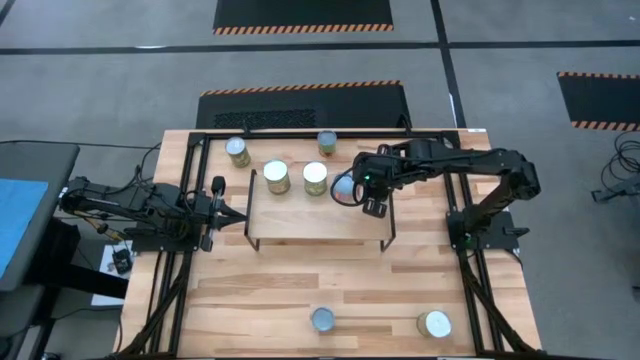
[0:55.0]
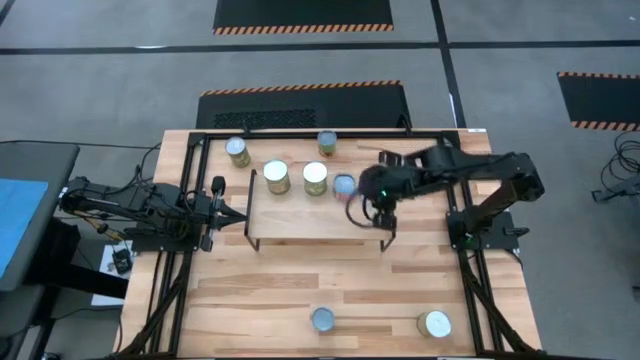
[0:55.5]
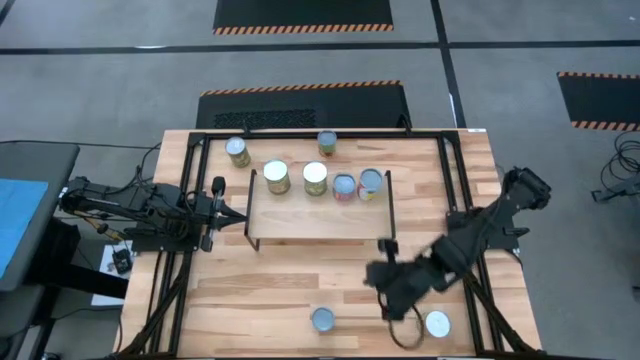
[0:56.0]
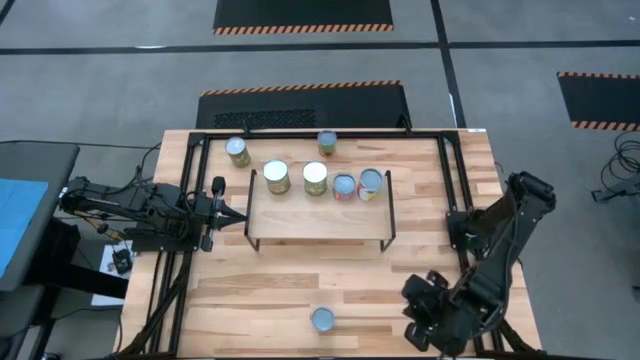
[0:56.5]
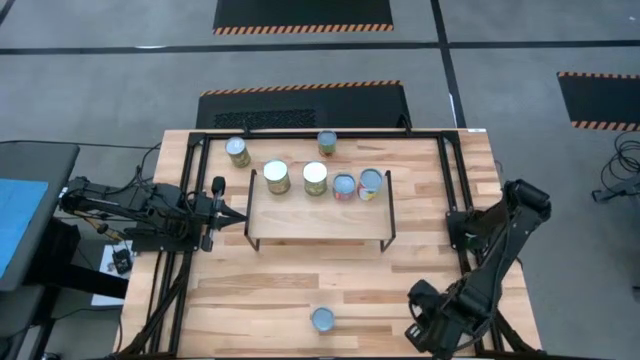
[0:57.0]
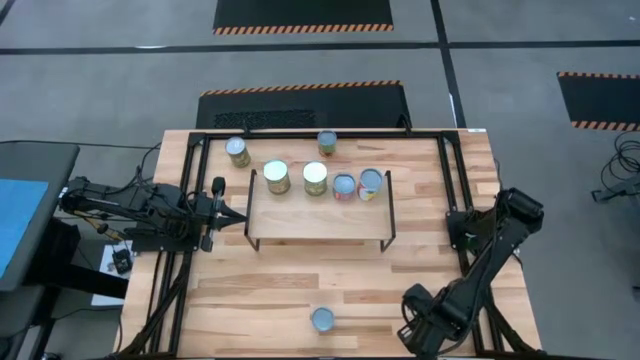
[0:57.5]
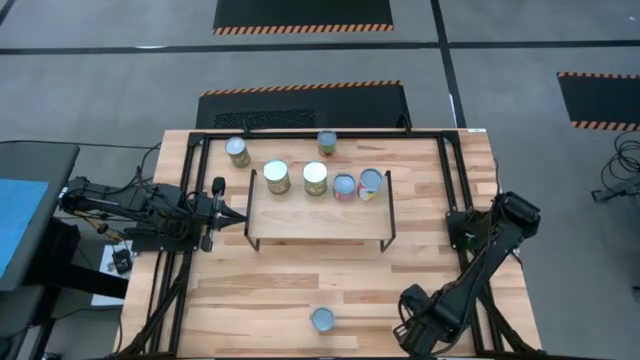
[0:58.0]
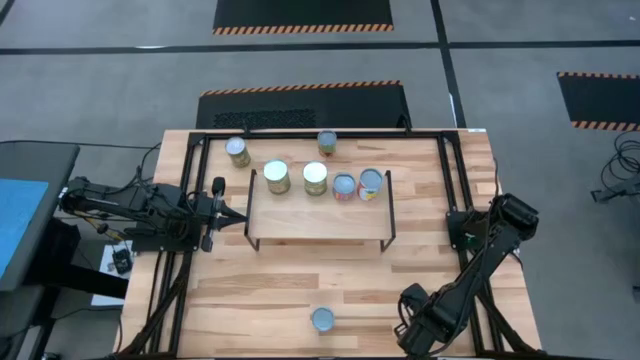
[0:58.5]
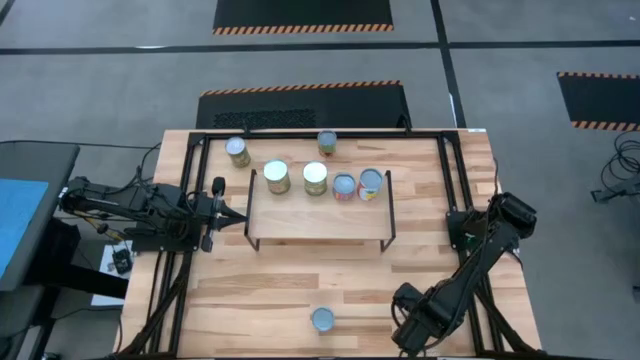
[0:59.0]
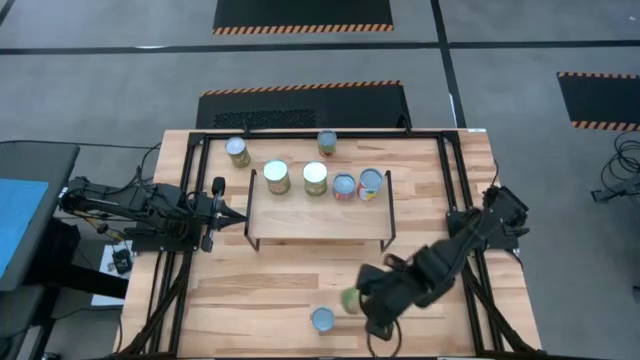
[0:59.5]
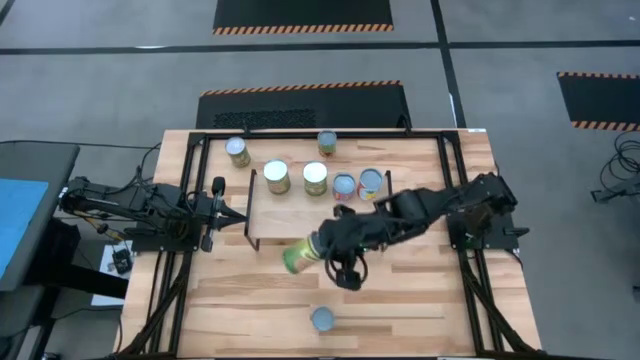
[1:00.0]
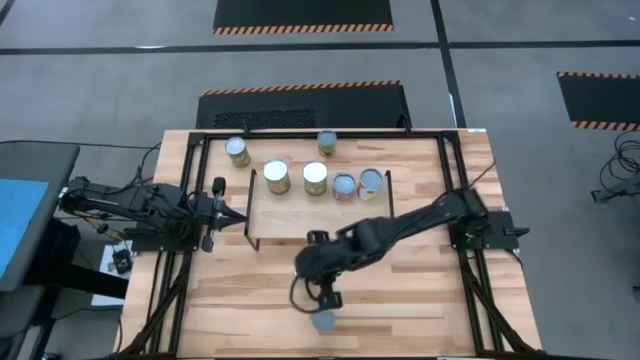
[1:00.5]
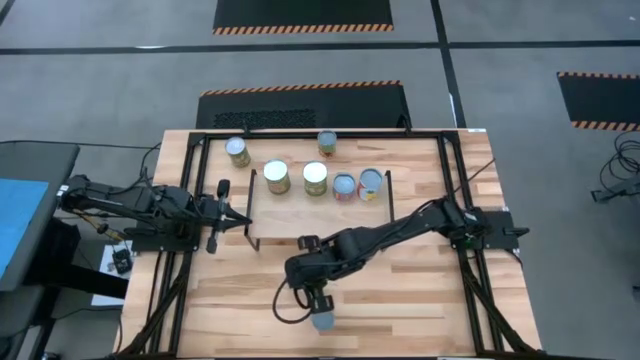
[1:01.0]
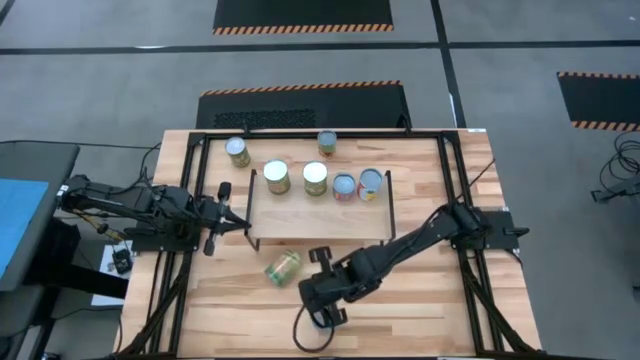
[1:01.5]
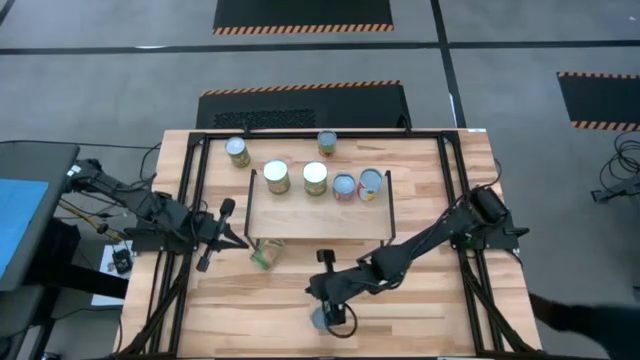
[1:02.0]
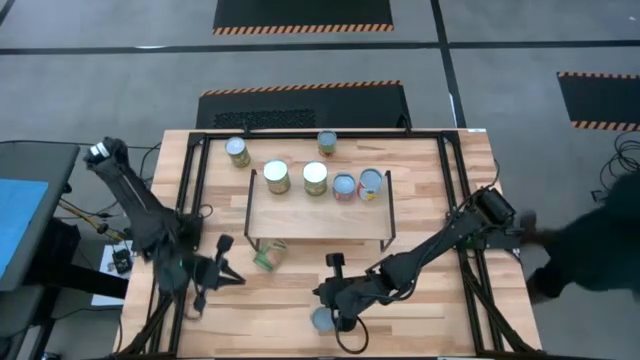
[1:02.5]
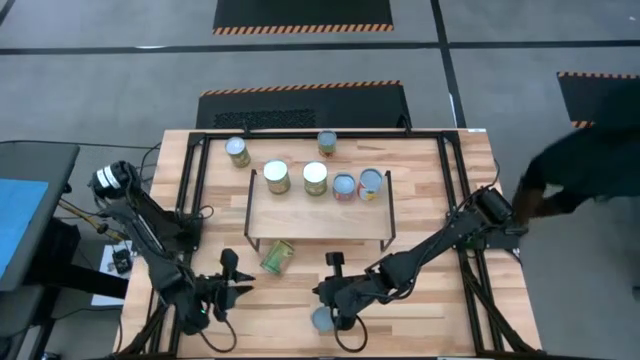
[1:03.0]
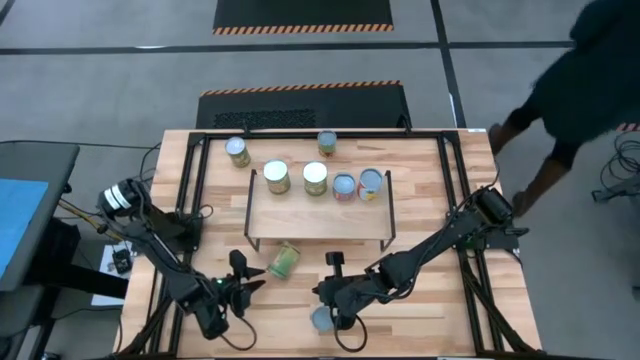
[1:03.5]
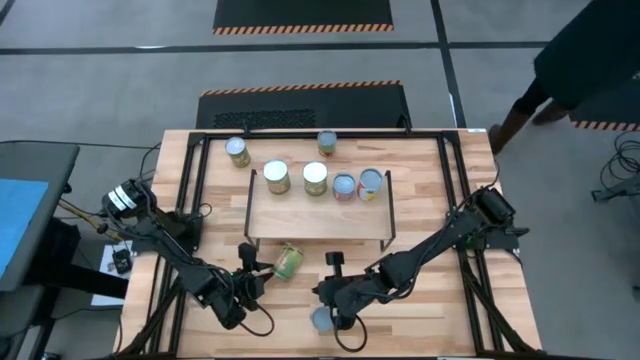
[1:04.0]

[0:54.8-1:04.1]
Task: Pick and place cans onto a shelf
Put the canned orange on the shelf

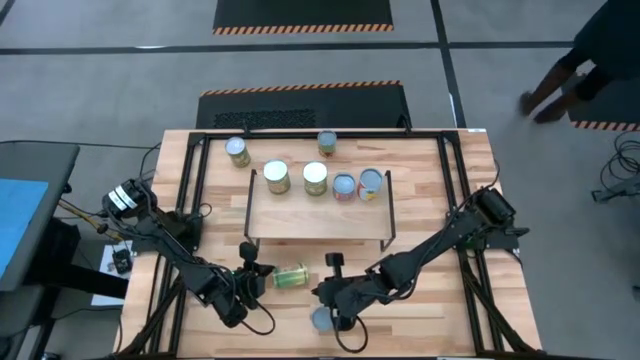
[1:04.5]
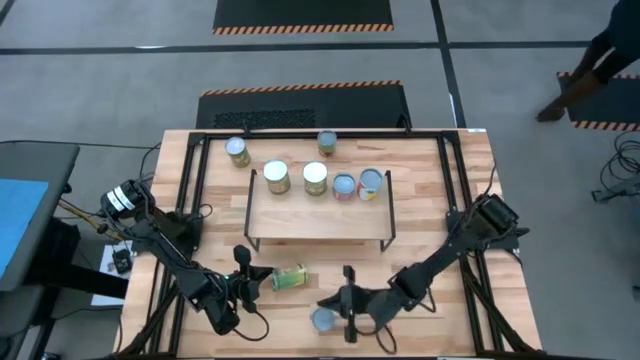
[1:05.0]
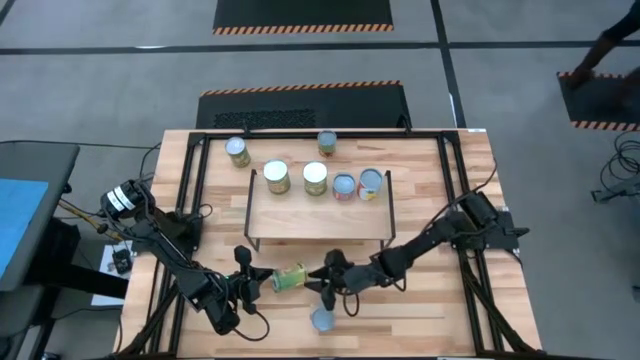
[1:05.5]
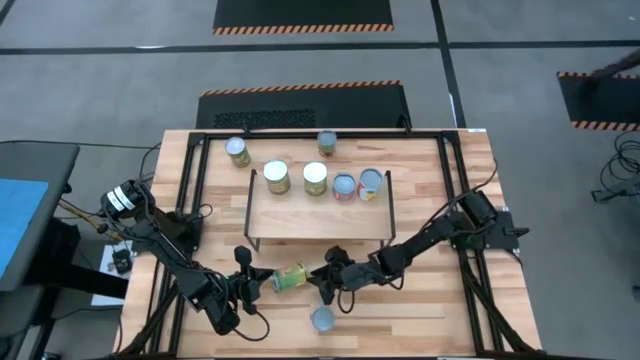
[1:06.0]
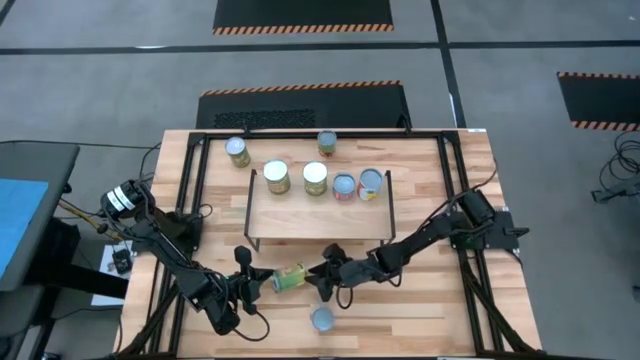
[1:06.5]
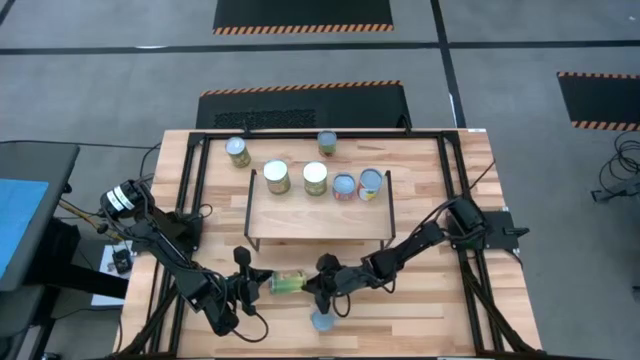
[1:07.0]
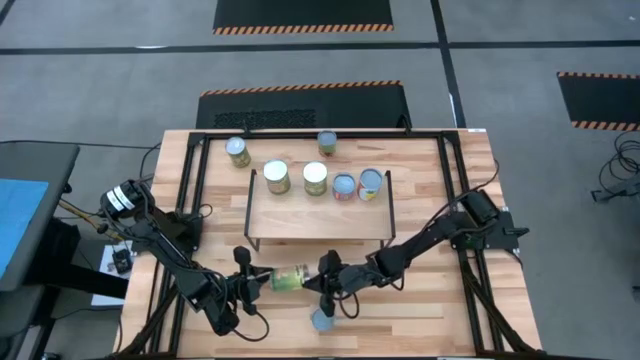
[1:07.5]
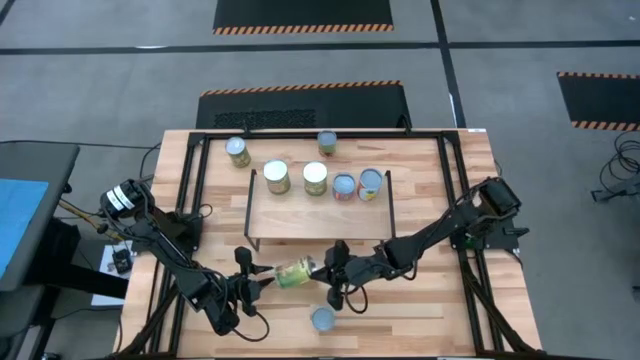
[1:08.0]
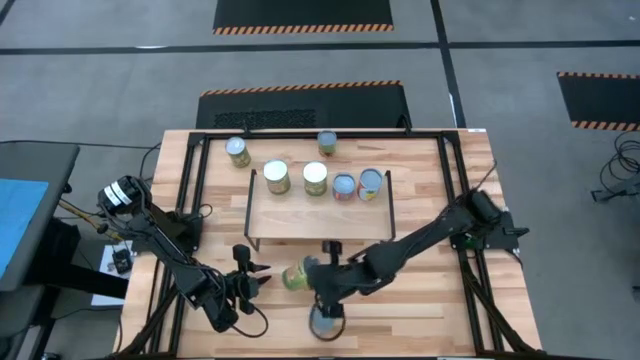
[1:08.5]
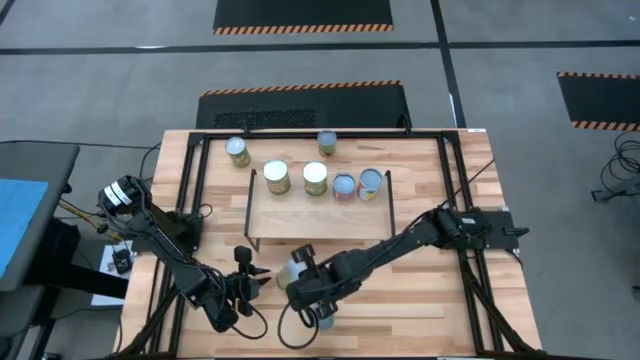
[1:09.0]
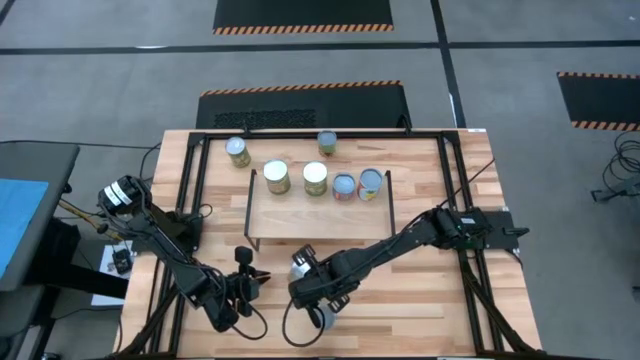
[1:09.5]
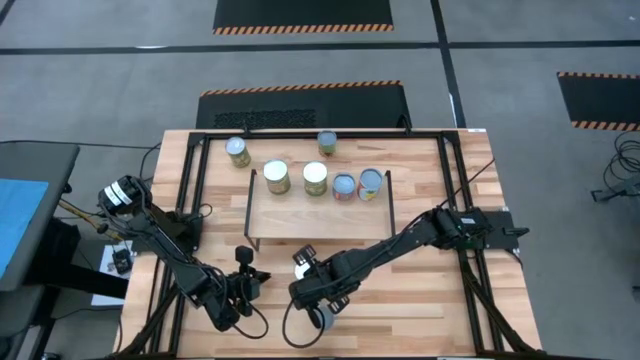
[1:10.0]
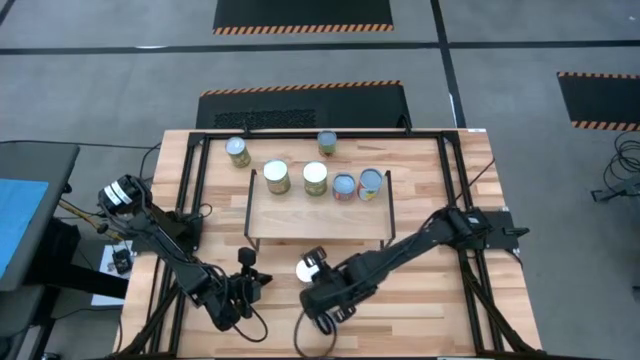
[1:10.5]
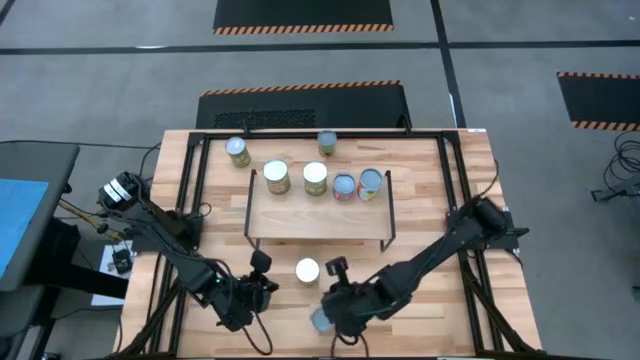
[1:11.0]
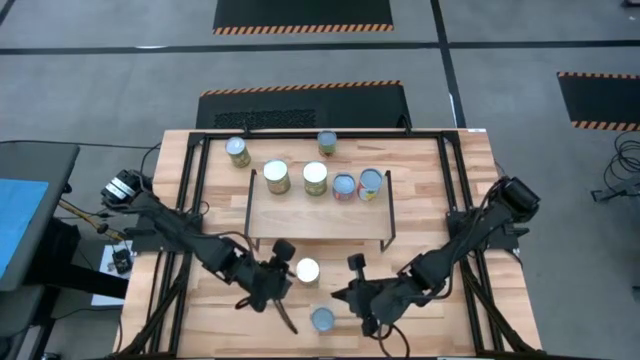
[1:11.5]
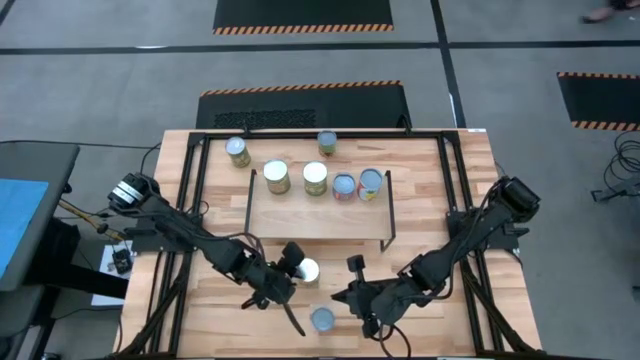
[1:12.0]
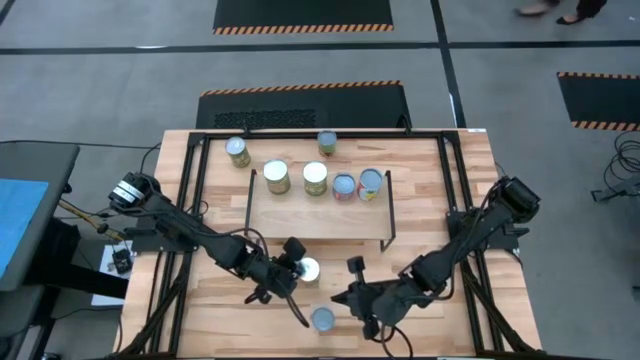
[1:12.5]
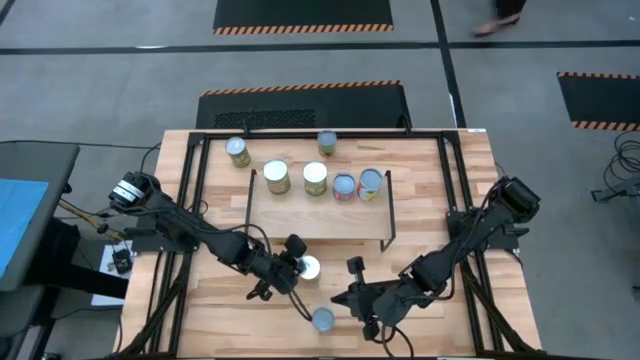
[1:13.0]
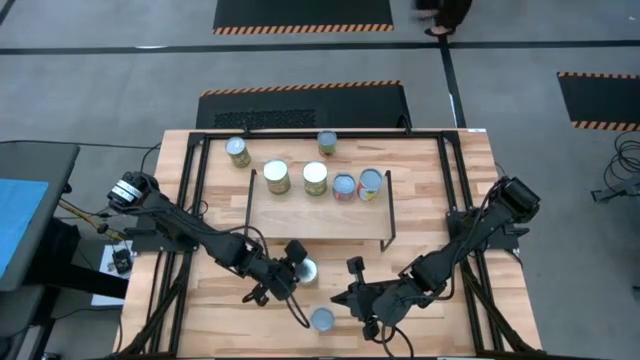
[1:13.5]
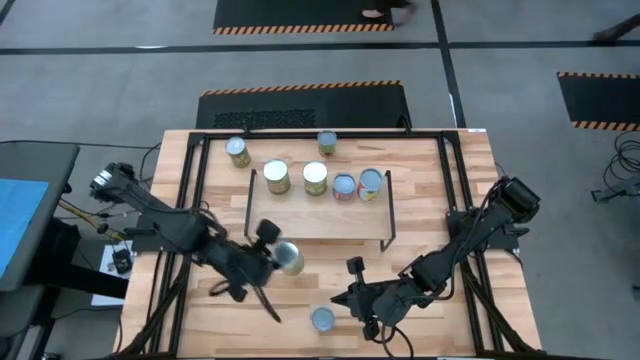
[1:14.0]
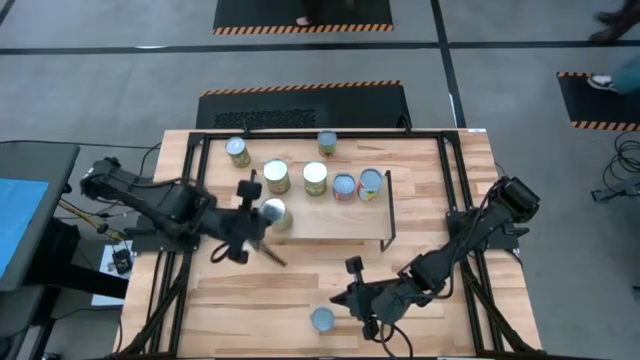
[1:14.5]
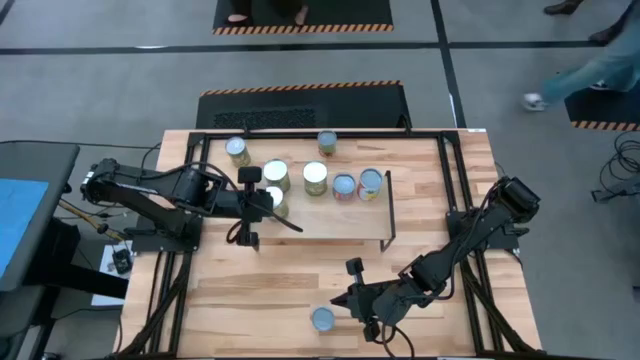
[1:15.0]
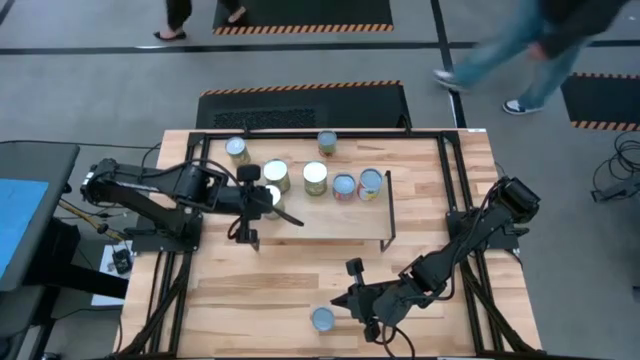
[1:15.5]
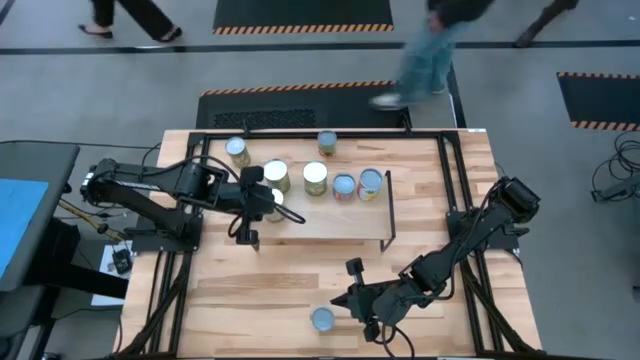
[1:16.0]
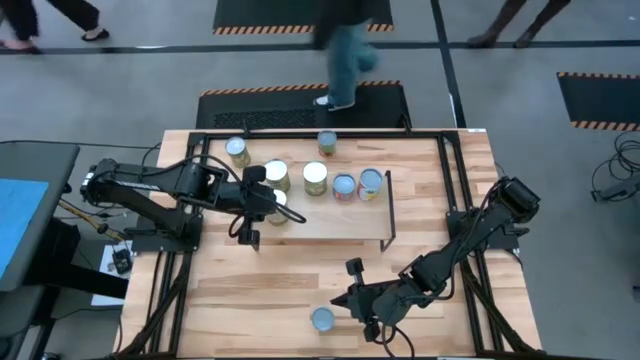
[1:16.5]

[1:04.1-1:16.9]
Put the canned orange on the shelf aligned with the other canned orange
